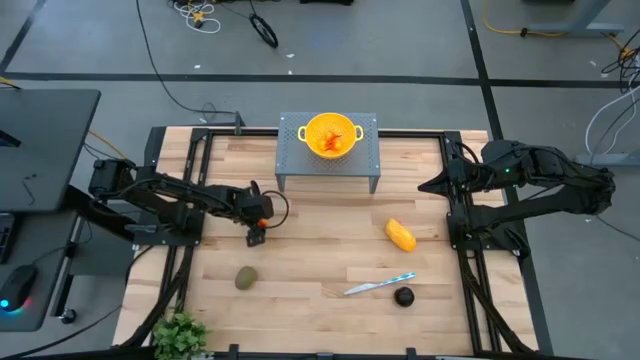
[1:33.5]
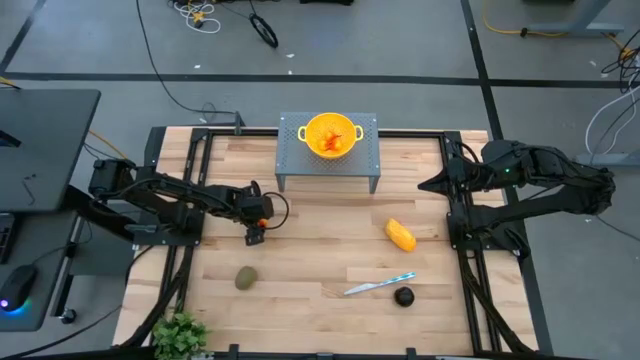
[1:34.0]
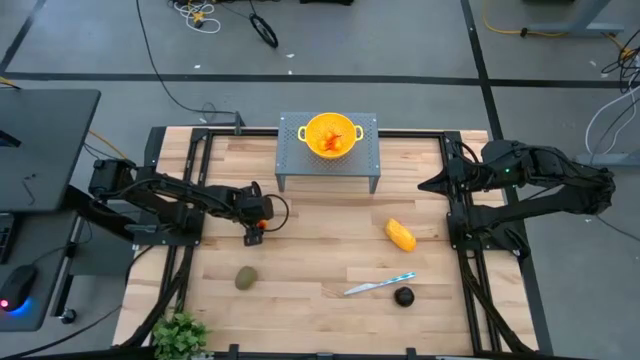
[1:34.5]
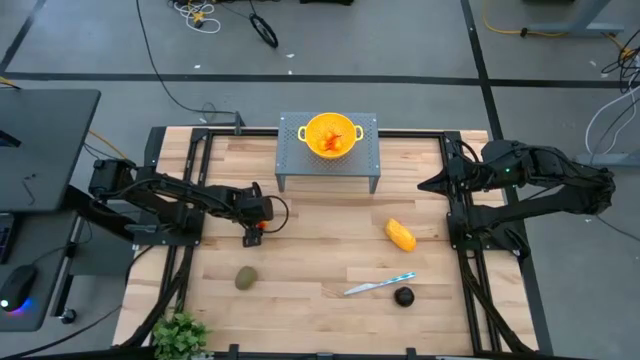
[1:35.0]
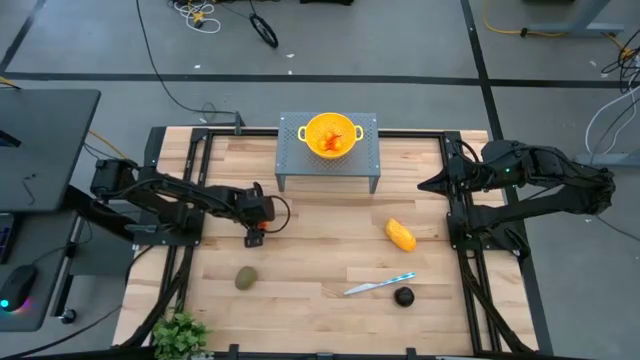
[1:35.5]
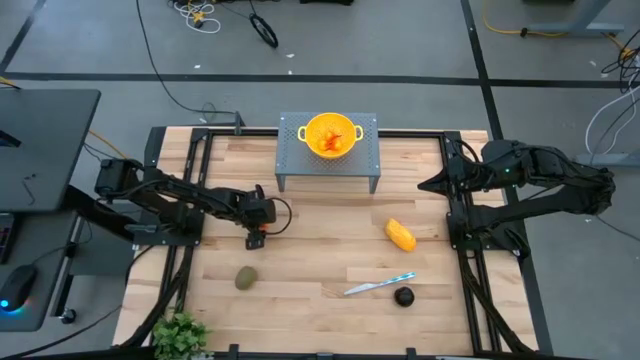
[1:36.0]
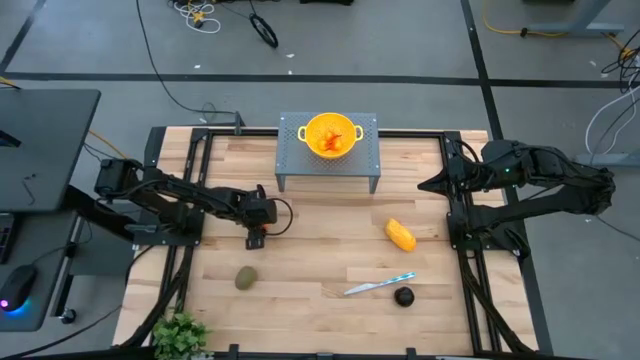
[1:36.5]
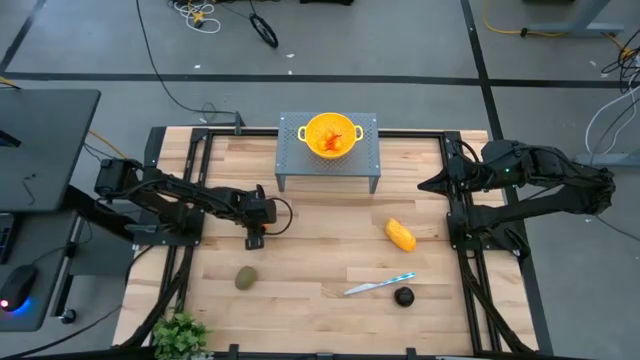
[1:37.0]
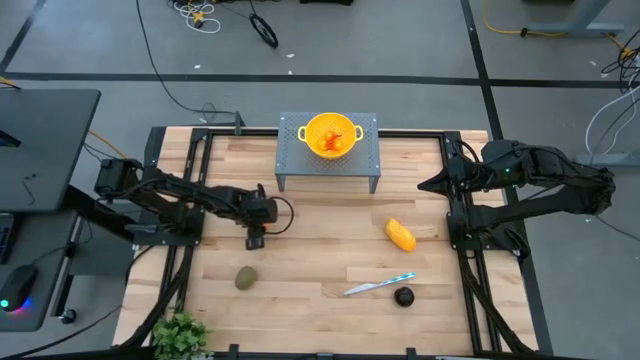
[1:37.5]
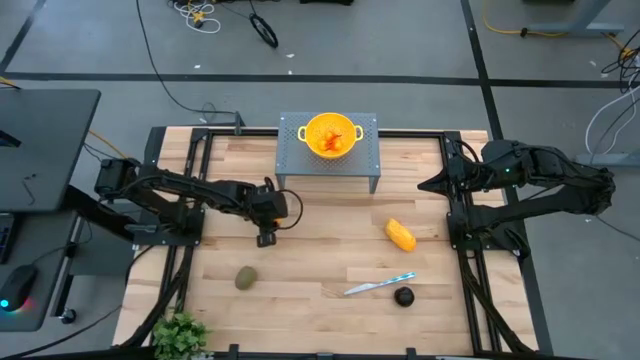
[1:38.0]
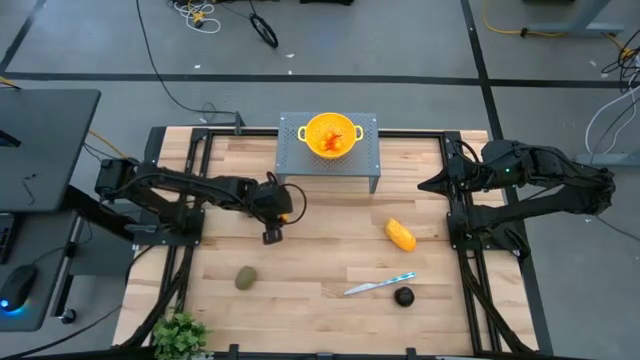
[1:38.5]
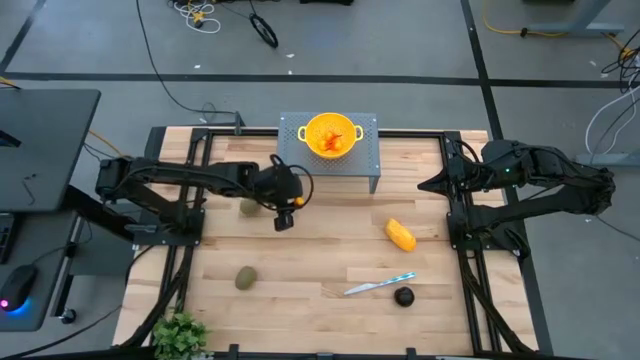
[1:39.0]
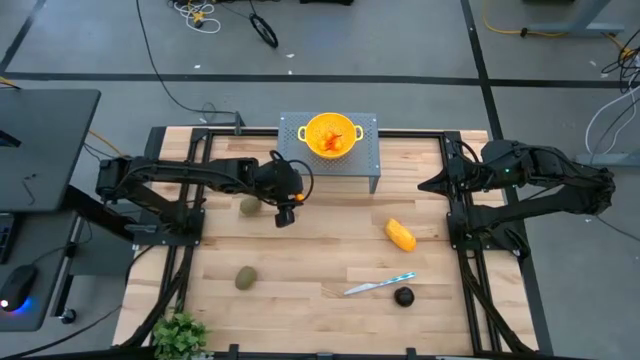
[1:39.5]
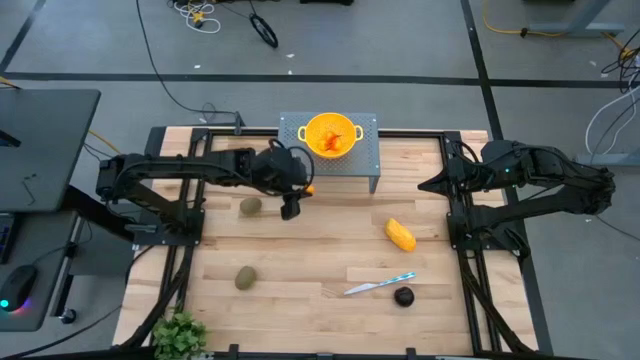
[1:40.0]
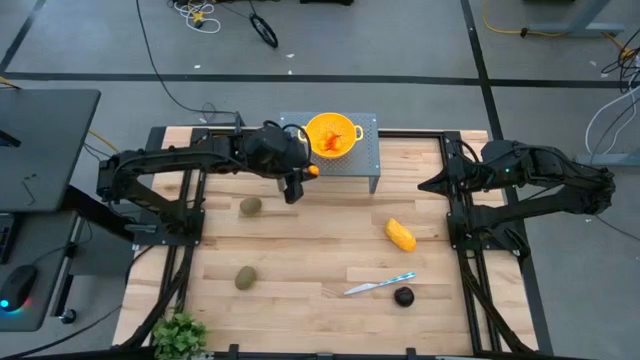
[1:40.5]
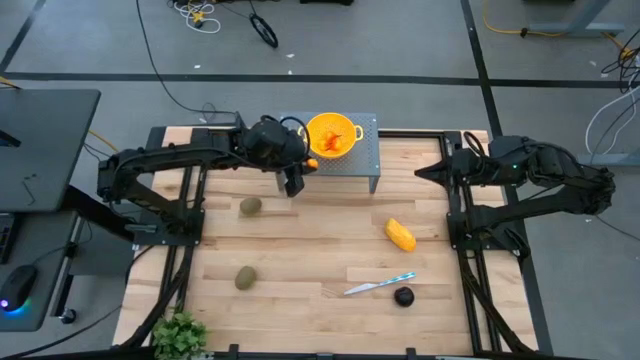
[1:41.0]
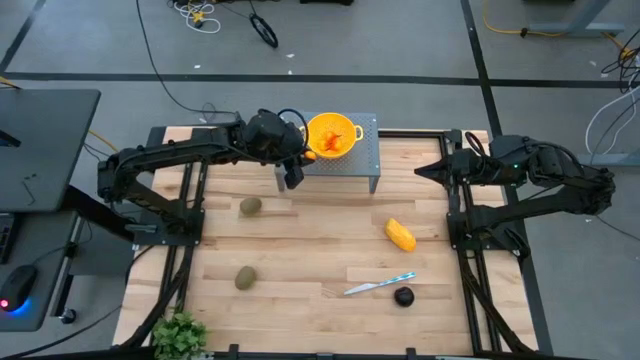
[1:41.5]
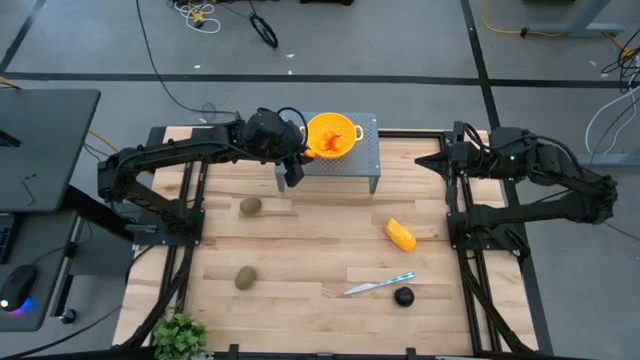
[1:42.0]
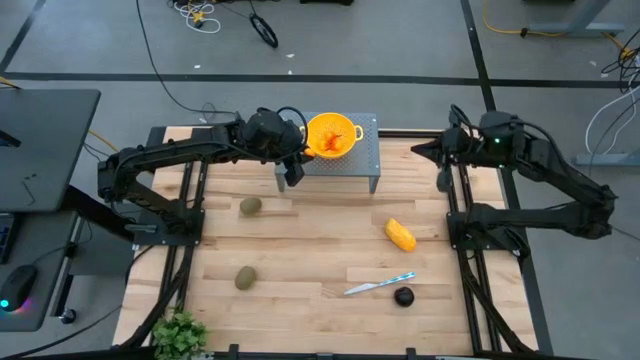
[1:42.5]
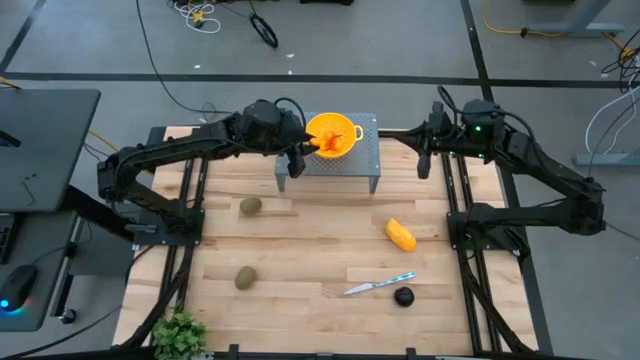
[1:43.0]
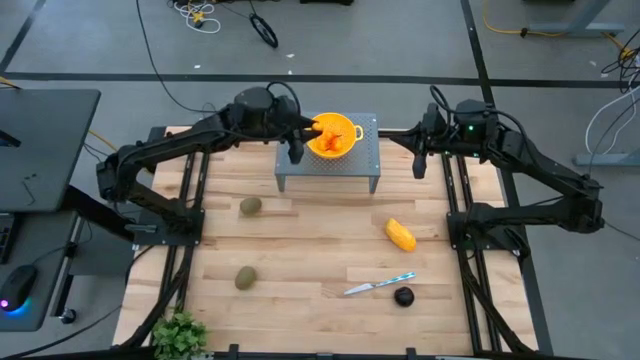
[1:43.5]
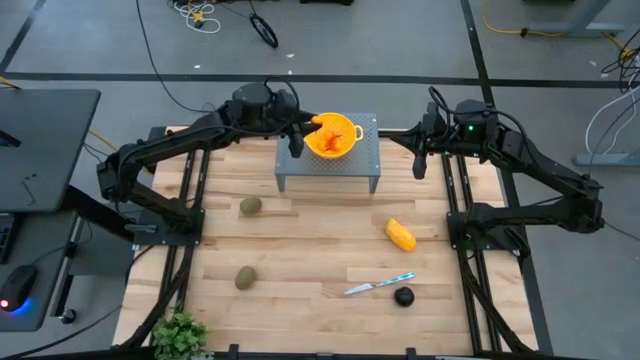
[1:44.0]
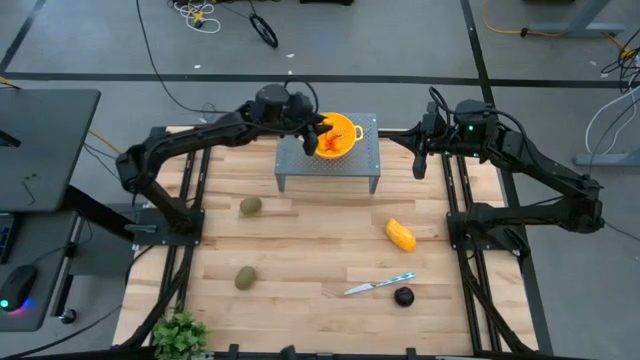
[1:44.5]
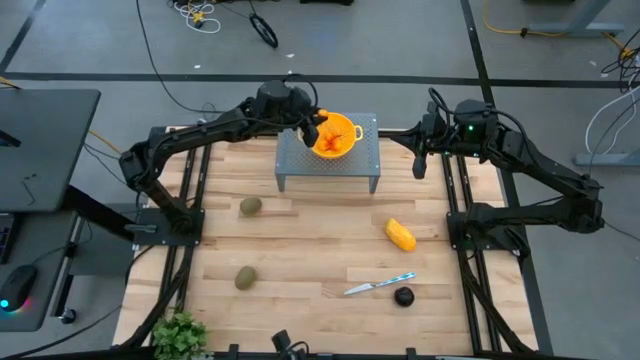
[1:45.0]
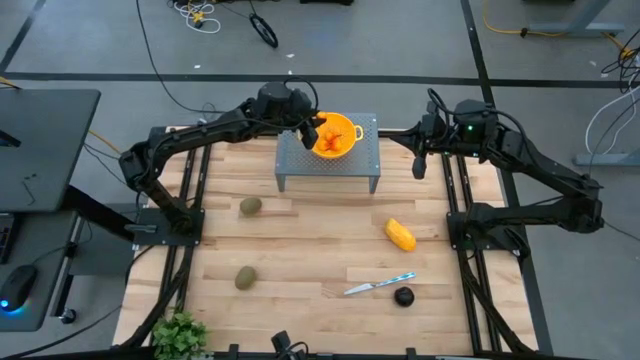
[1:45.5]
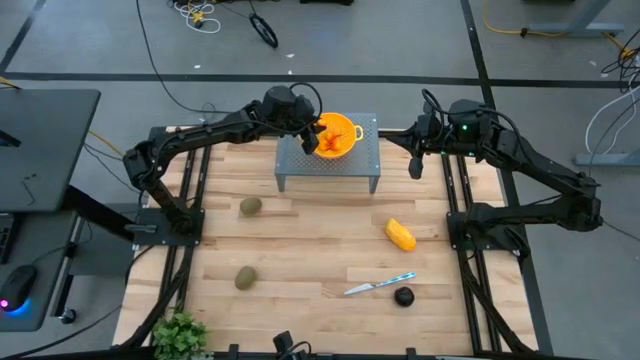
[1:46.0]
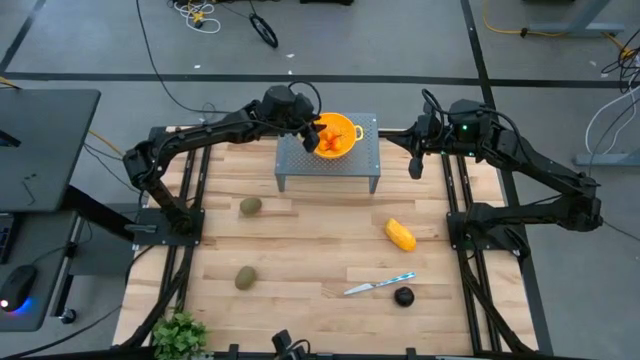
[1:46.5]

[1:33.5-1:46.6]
Task: Pick & Place Fruit
Put the yellow pear into the yellow strainer bowl on the shelf

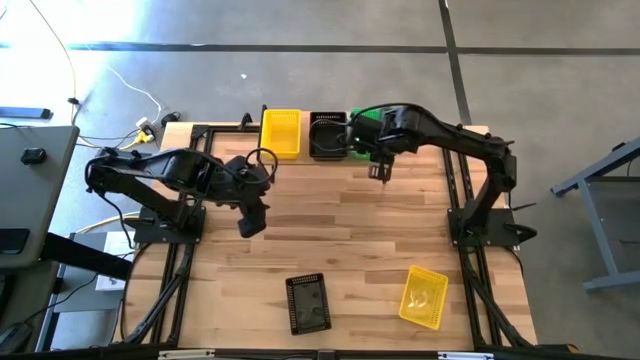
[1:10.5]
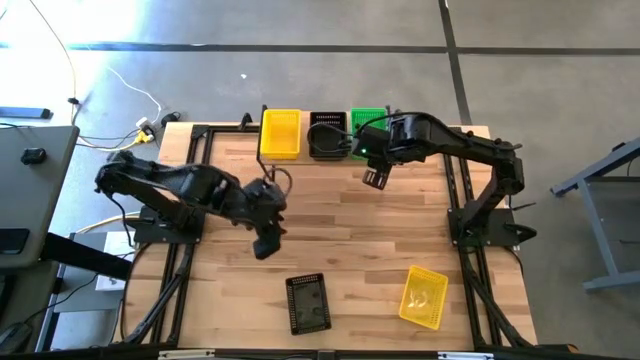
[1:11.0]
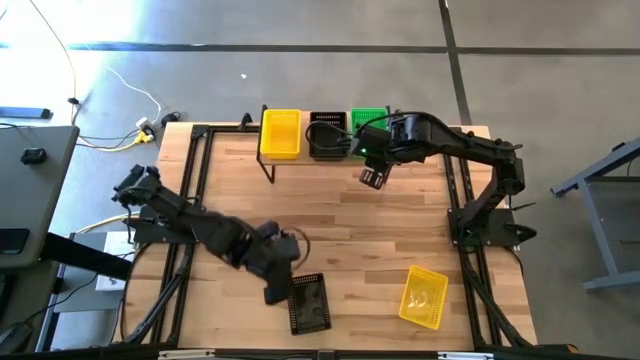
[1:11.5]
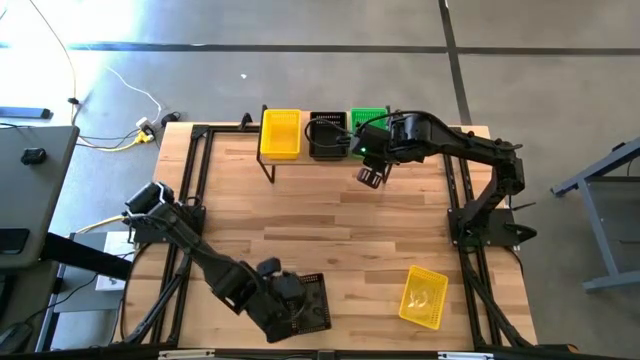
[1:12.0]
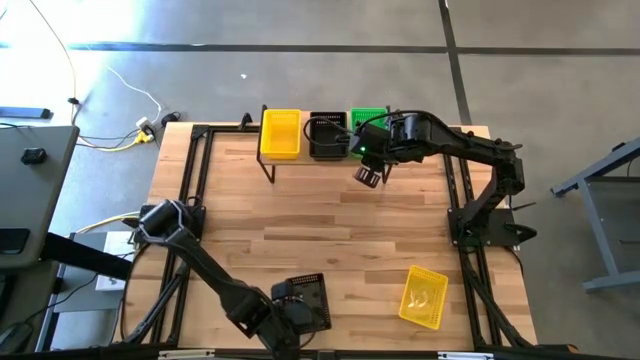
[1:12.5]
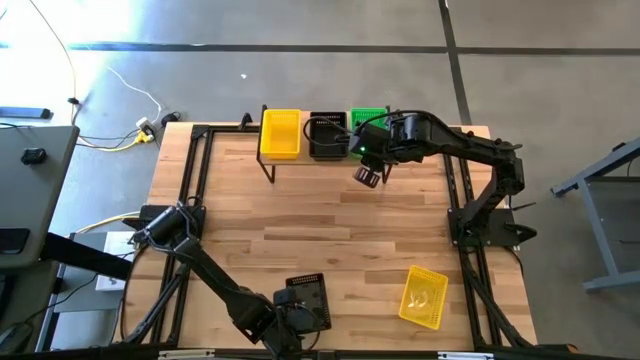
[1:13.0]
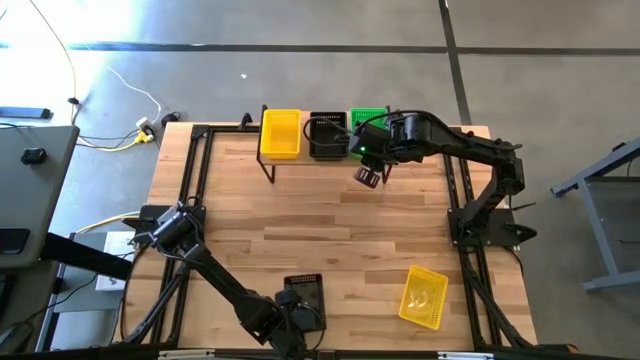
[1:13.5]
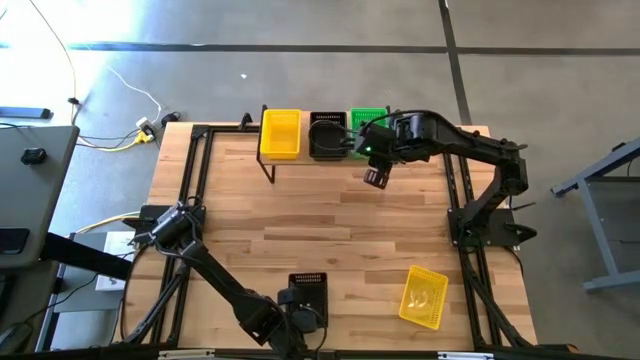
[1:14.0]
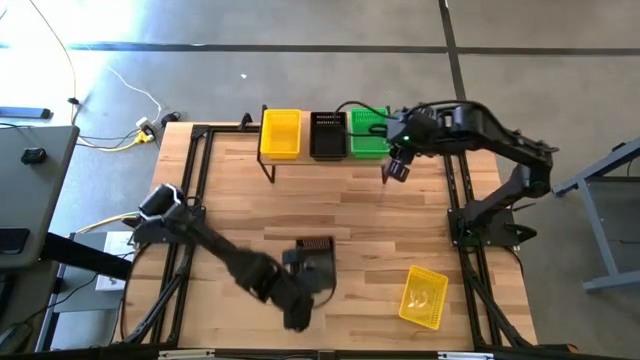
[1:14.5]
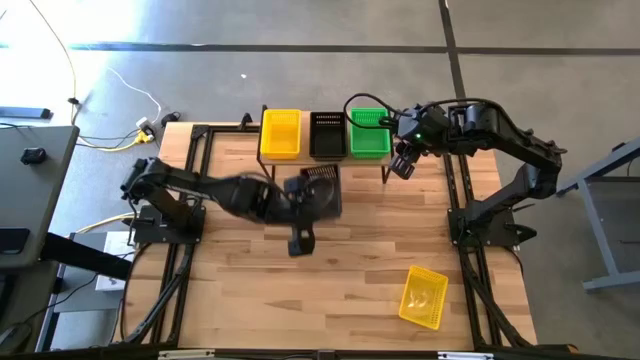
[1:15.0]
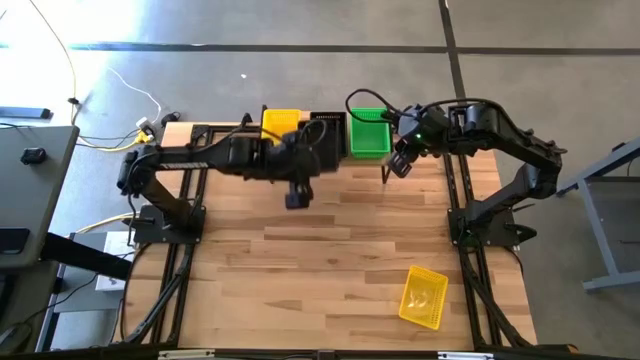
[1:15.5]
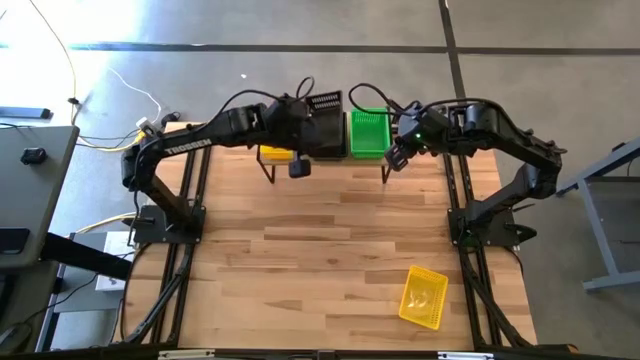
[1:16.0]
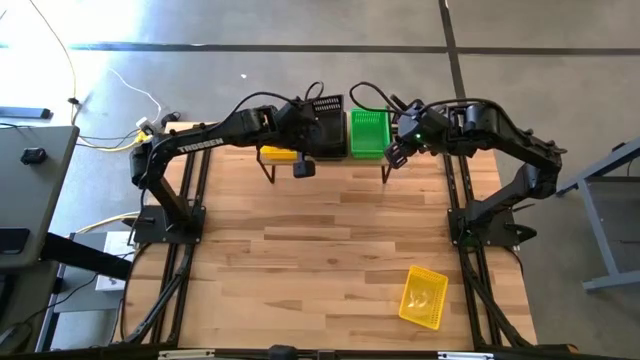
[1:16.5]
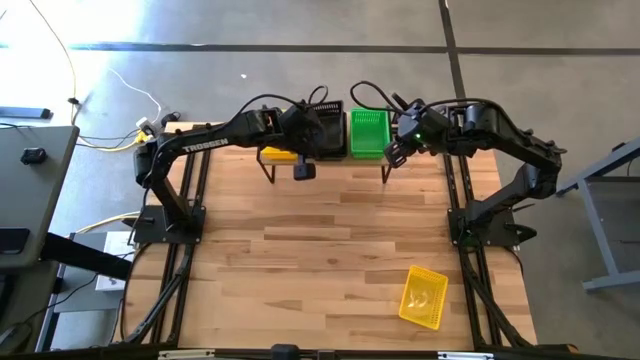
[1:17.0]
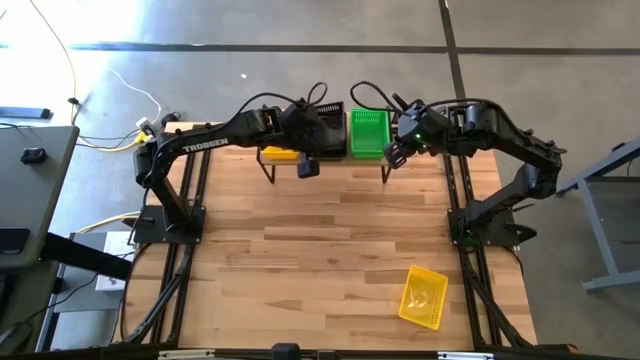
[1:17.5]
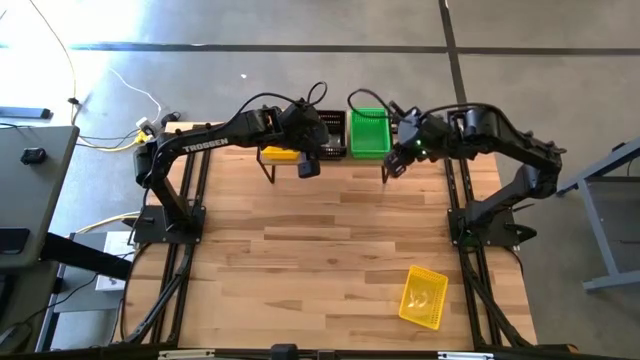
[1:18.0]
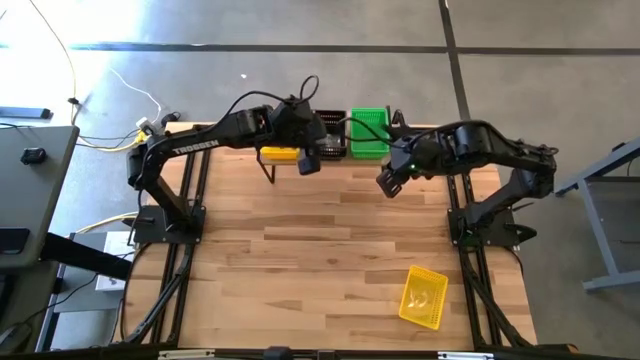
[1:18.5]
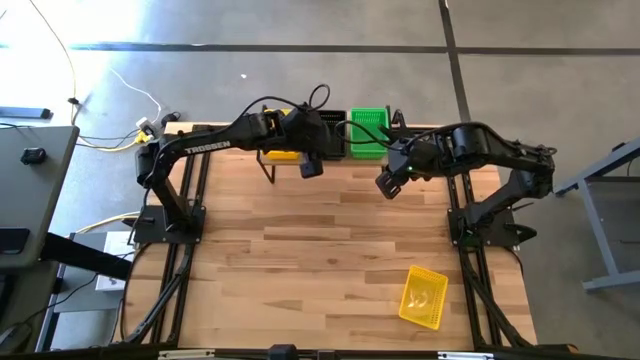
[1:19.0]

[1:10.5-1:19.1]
Task: Stack baskets on shelf by color
Stack the black bin on the other stacked black bins on the shelf
